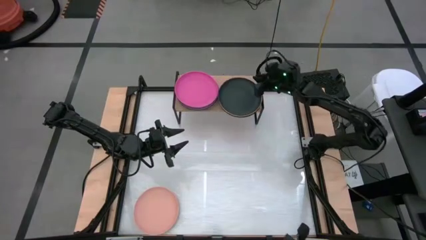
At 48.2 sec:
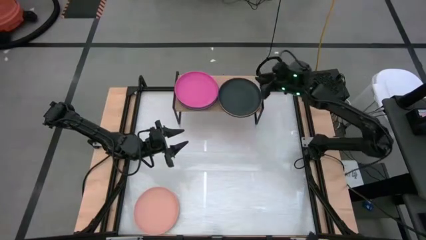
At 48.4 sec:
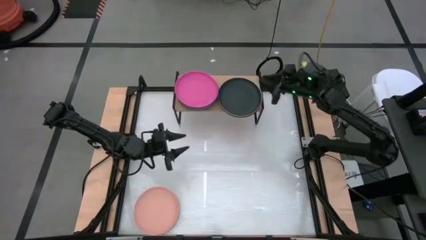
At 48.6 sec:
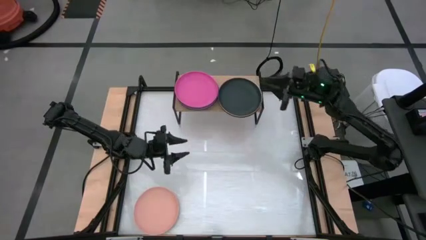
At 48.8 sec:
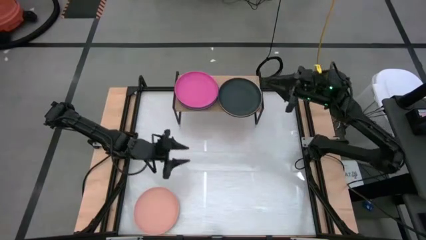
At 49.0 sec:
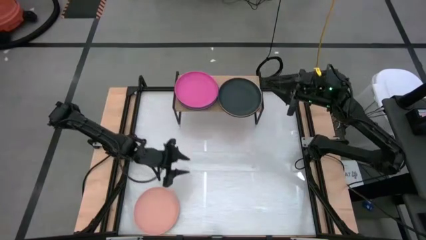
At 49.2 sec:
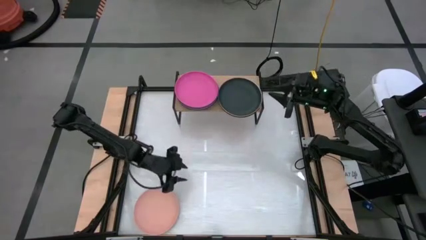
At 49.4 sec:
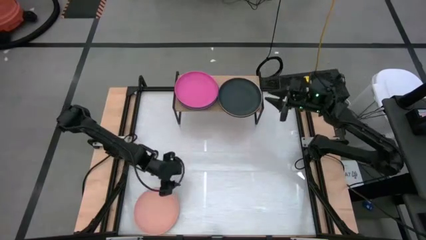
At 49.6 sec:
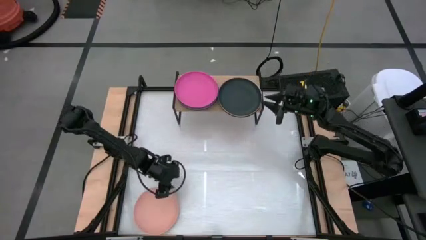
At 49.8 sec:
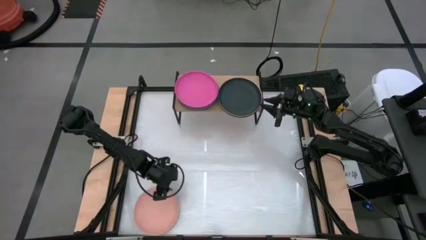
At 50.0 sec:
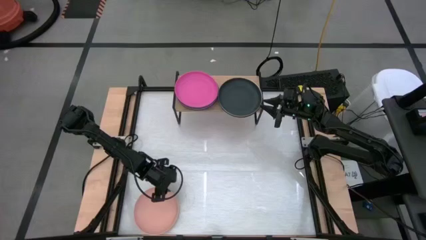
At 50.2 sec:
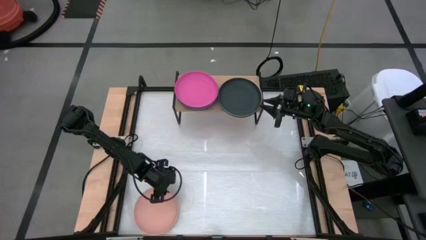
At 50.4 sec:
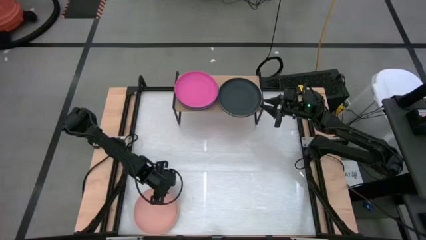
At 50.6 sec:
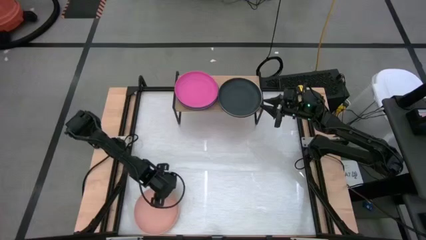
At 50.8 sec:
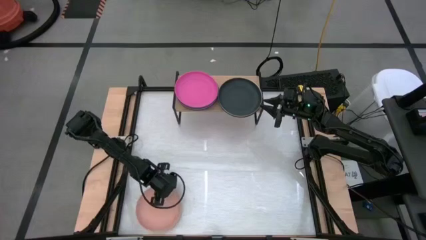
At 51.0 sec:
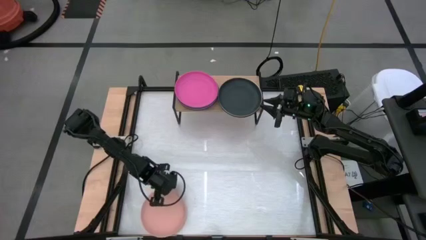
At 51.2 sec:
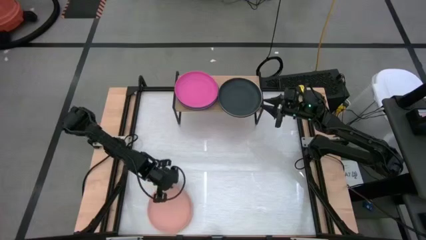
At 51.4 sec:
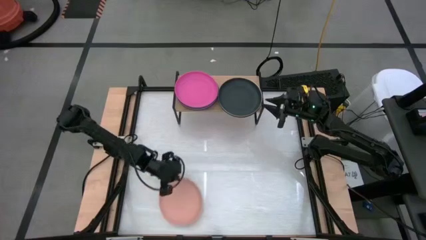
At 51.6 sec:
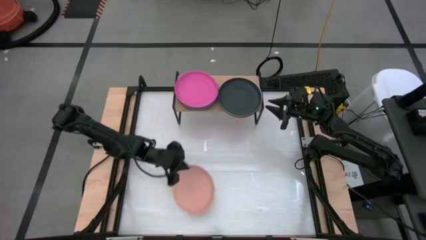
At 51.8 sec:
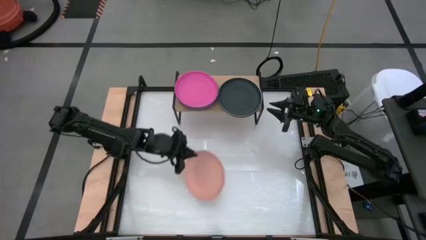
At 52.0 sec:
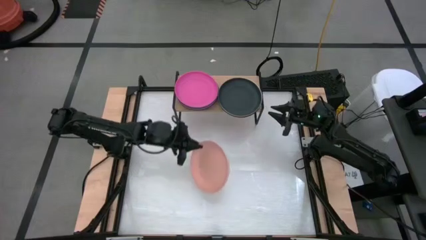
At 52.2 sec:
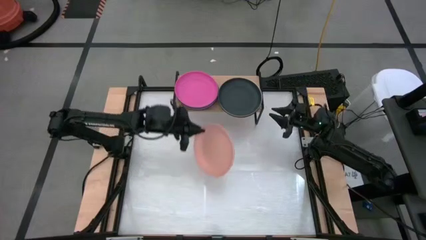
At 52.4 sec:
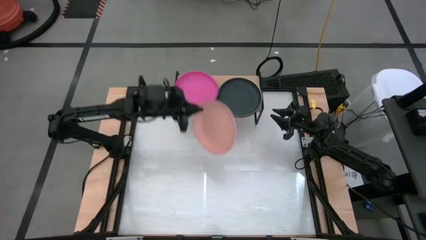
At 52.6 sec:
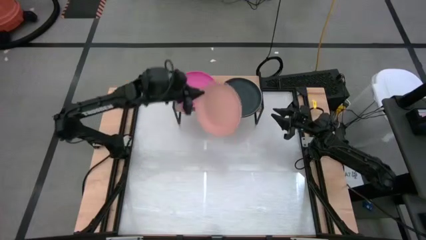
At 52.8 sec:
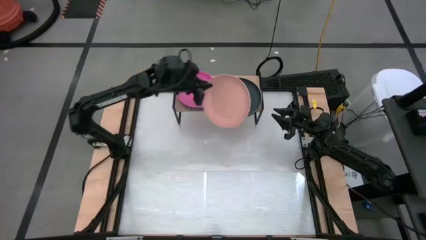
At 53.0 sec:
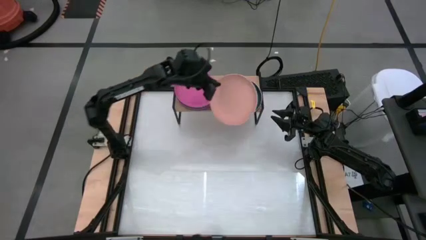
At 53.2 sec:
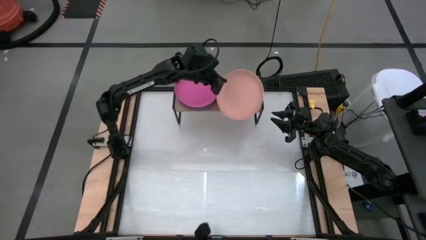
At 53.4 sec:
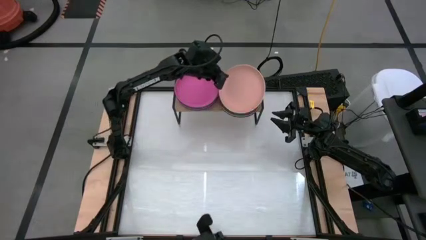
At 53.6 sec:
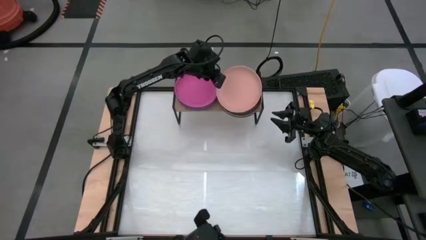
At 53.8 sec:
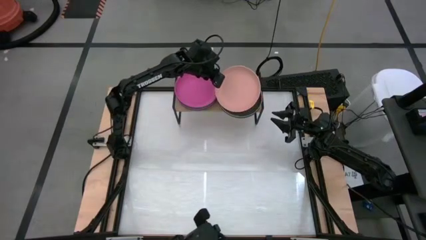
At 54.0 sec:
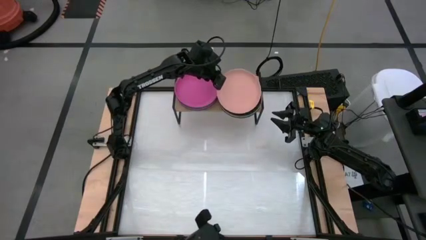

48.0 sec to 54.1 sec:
Task: Place and stack plates onto a shelf
Stack the orange plate on top of the black plate on the shelf

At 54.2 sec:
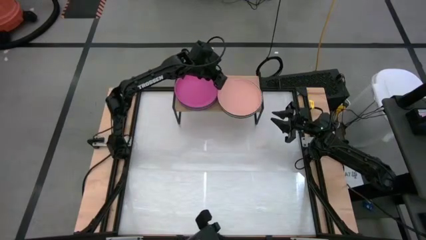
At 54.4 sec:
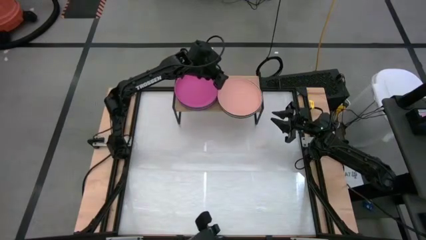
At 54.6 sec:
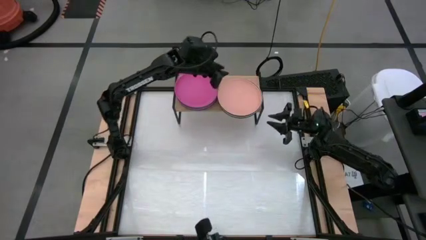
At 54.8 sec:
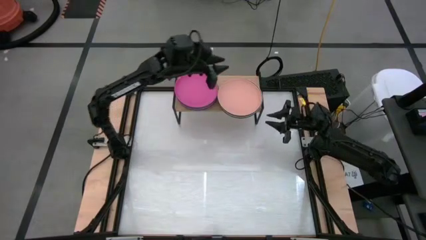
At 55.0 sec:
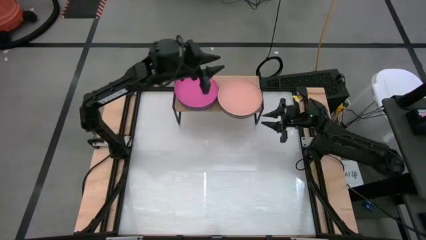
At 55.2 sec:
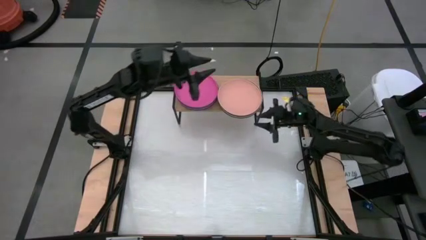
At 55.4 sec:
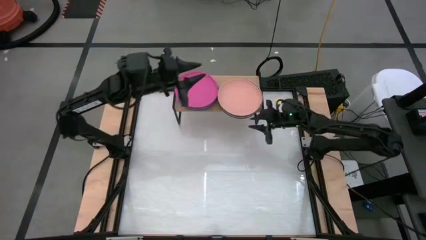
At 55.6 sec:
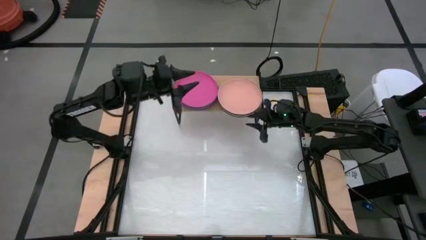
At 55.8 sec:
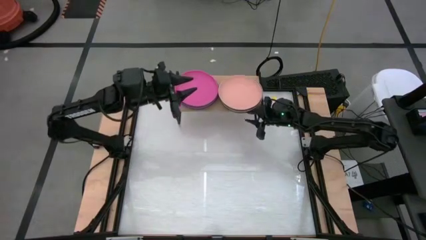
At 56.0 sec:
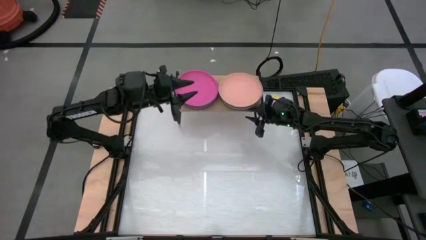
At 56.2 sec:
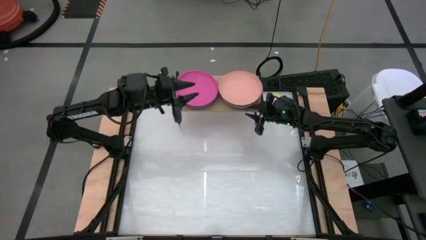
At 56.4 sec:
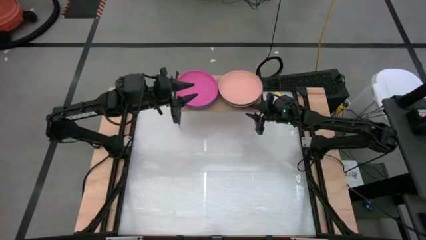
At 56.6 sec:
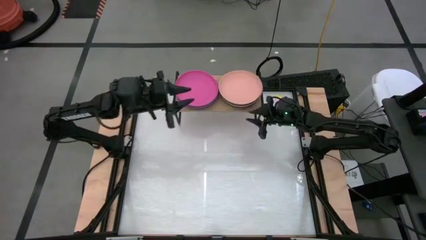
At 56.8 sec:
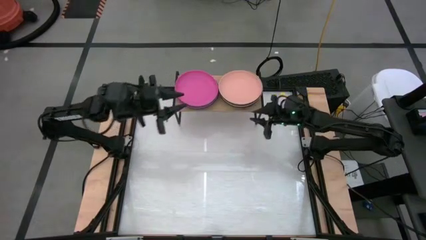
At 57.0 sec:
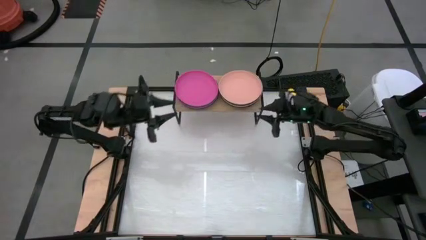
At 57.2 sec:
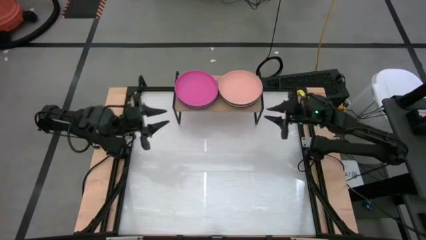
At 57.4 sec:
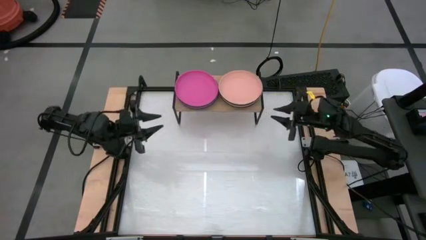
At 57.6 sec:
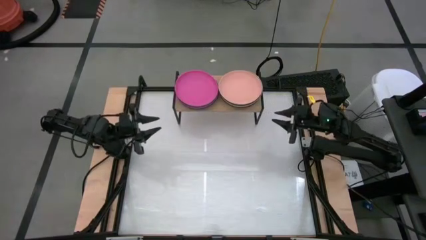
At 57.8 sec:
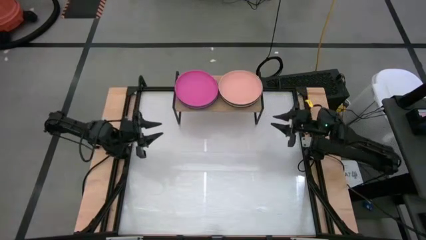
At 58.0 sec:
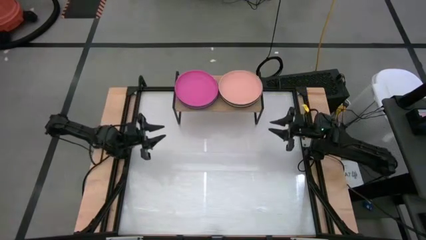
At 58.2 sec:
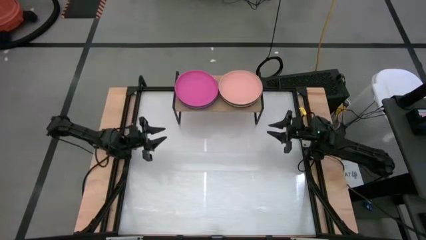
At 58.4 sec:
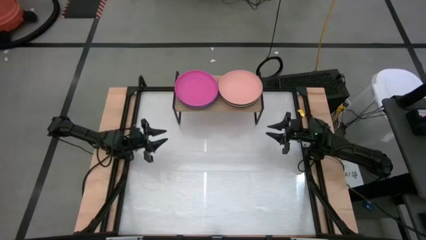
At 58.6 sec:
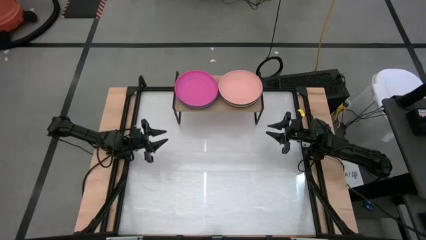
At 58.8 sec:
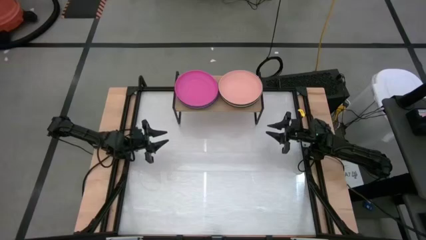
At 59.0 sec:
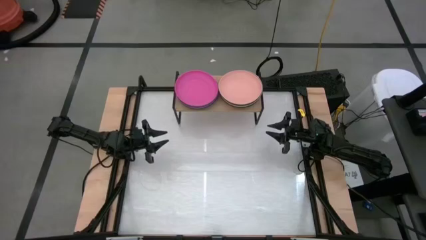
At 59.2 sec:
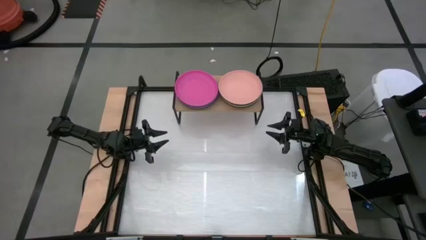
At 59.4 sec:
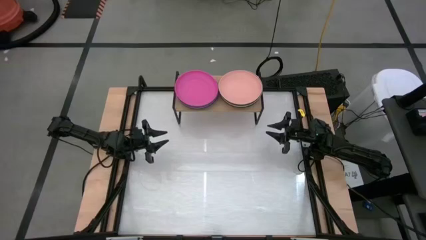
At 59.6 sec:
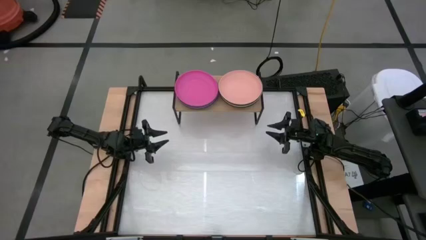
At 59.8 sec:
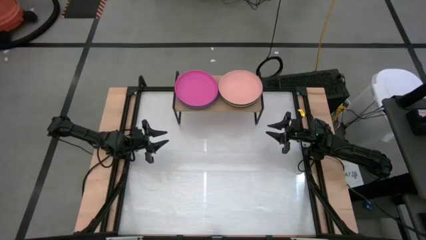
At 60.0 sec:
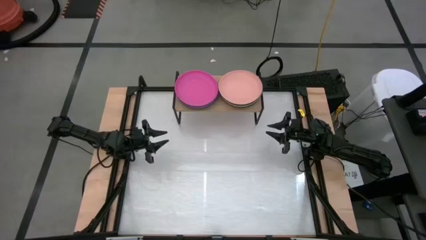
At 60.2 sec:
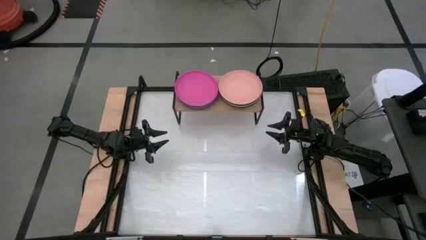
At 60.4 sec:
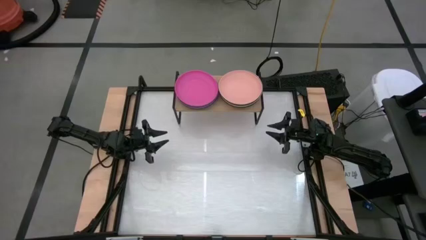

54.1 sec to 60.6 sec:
Return to Home Position
